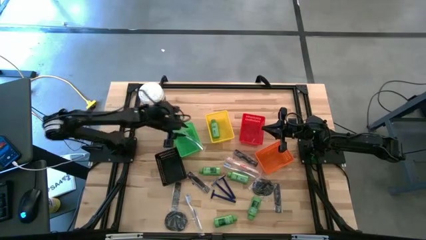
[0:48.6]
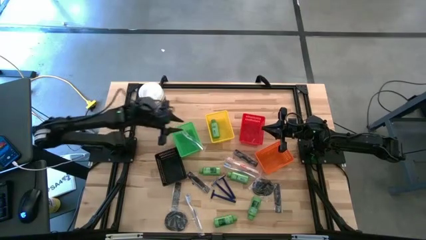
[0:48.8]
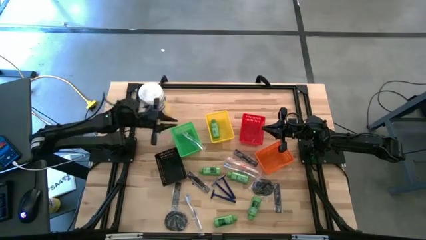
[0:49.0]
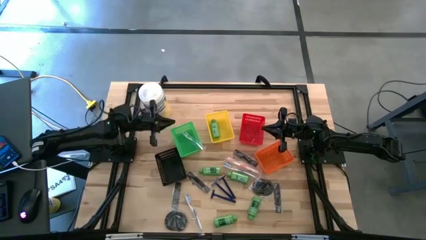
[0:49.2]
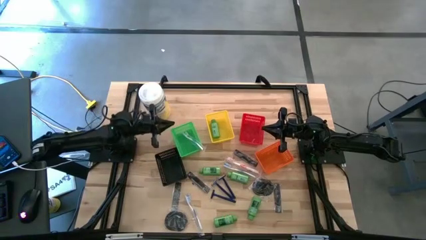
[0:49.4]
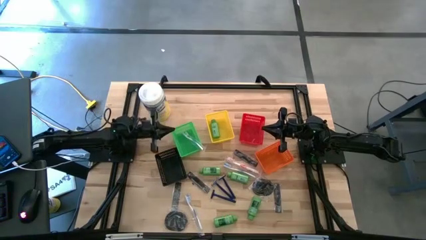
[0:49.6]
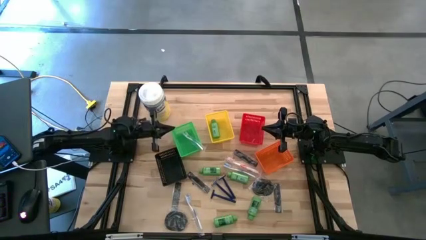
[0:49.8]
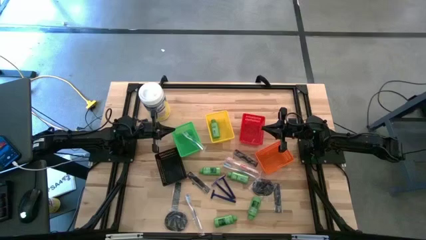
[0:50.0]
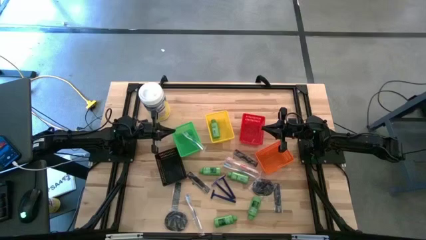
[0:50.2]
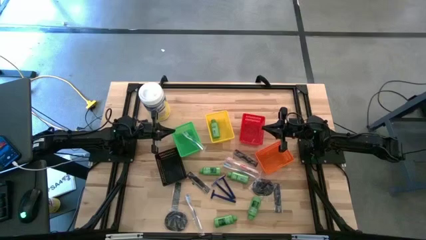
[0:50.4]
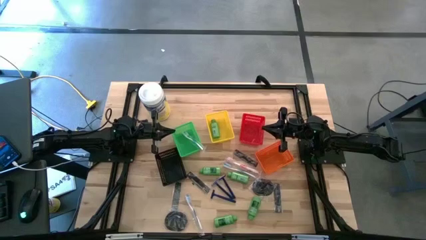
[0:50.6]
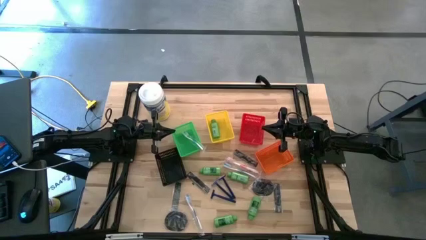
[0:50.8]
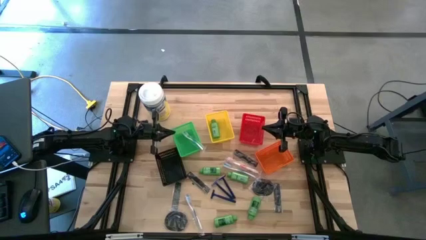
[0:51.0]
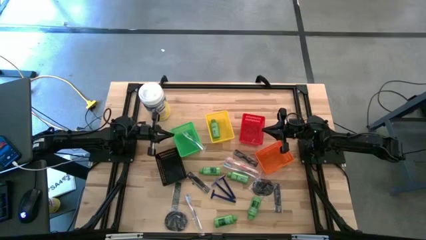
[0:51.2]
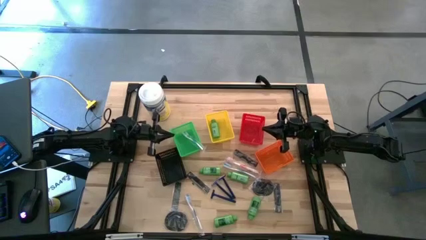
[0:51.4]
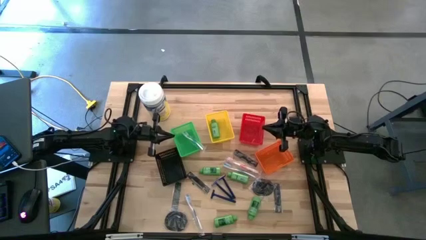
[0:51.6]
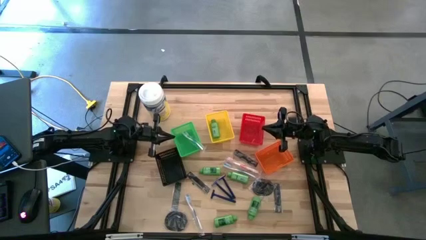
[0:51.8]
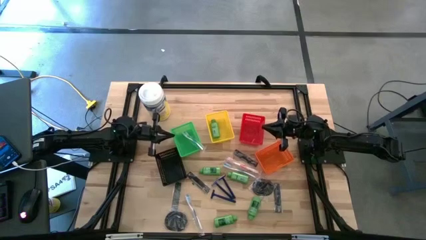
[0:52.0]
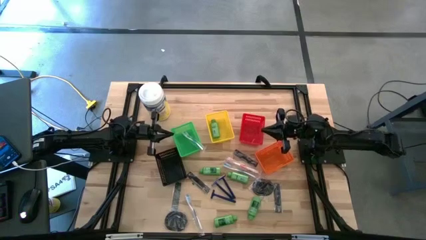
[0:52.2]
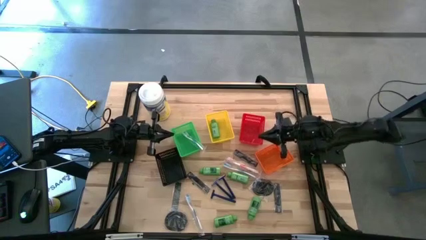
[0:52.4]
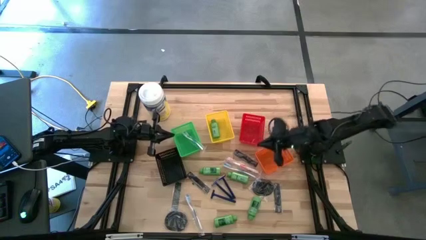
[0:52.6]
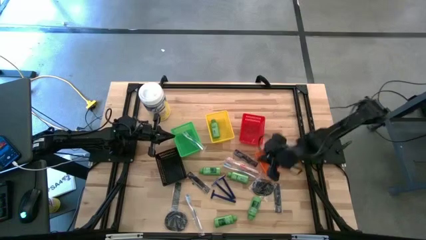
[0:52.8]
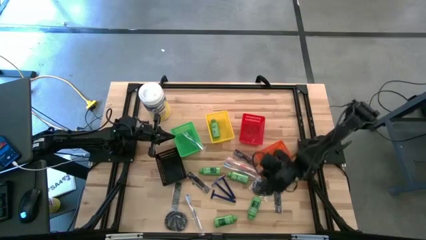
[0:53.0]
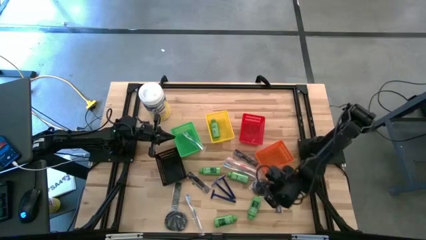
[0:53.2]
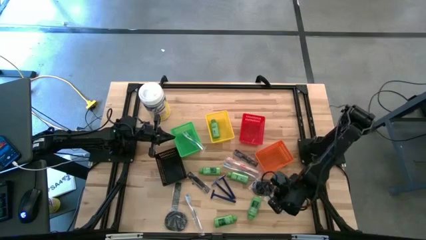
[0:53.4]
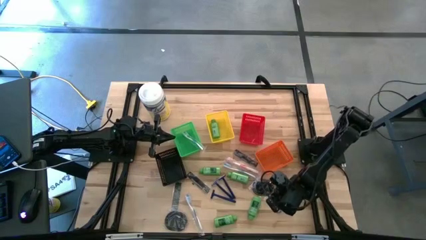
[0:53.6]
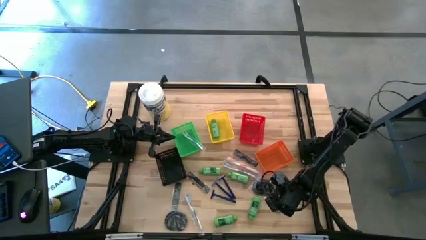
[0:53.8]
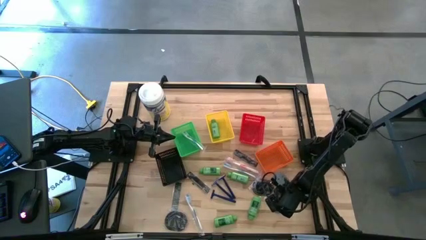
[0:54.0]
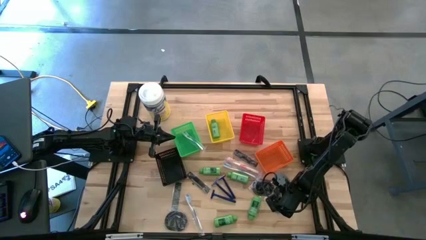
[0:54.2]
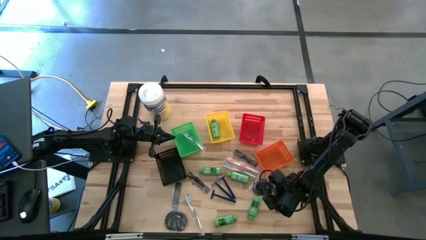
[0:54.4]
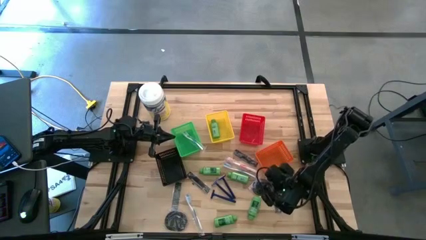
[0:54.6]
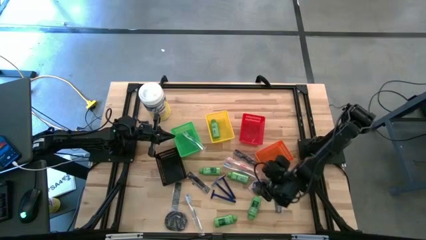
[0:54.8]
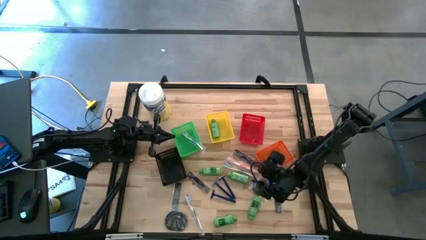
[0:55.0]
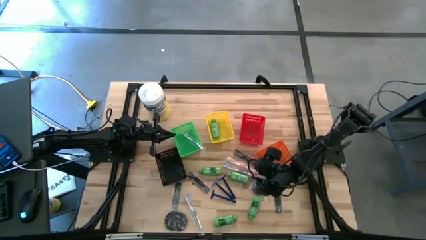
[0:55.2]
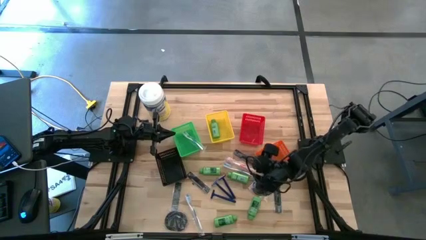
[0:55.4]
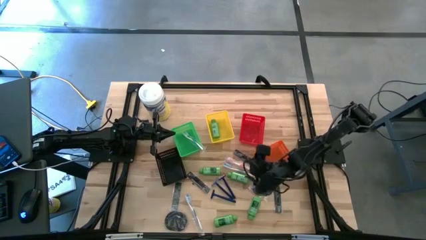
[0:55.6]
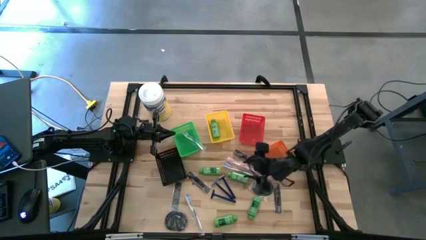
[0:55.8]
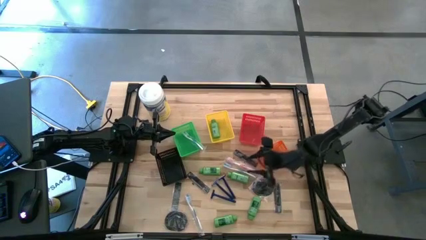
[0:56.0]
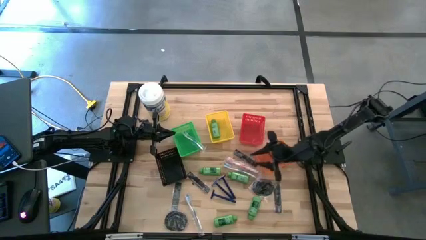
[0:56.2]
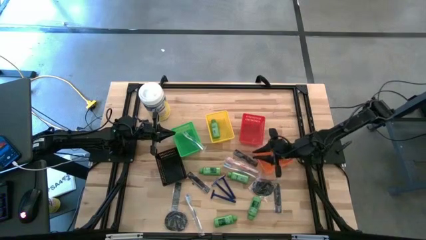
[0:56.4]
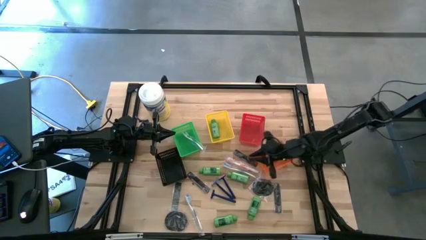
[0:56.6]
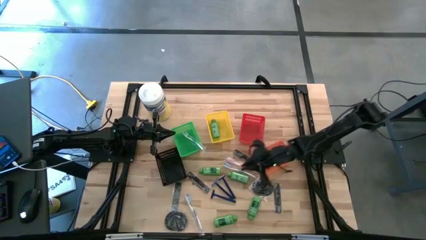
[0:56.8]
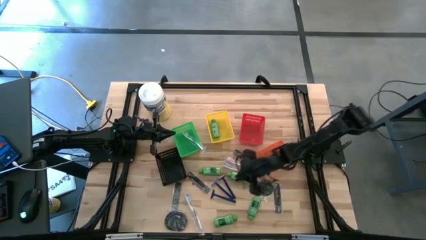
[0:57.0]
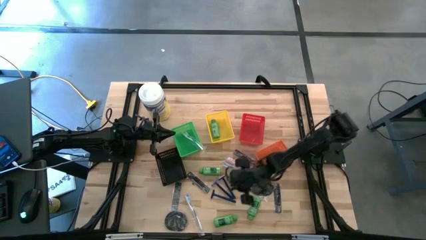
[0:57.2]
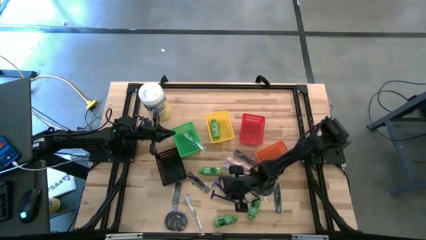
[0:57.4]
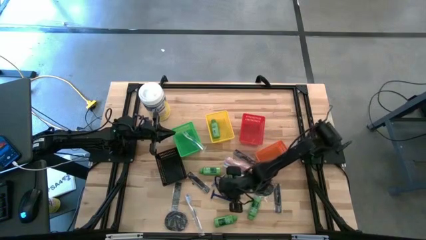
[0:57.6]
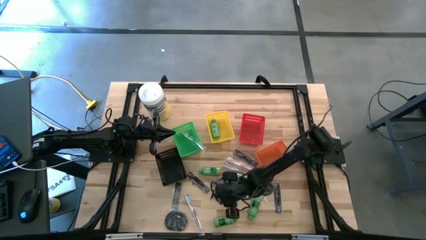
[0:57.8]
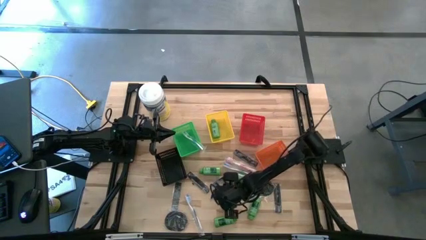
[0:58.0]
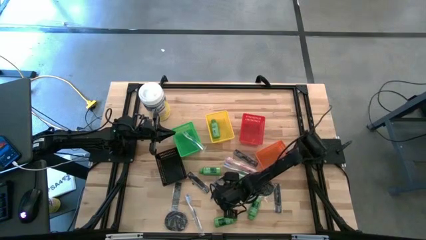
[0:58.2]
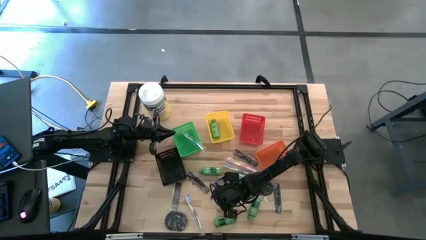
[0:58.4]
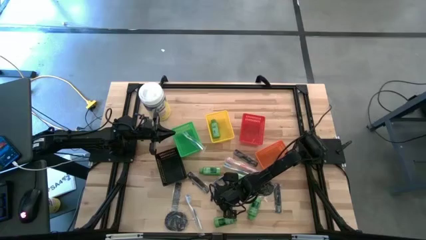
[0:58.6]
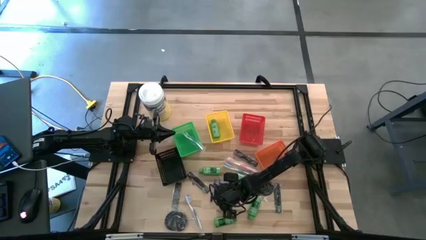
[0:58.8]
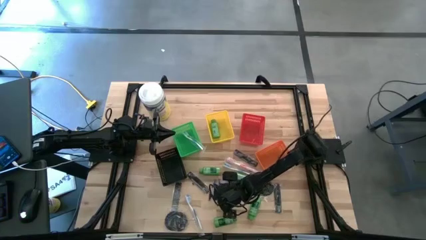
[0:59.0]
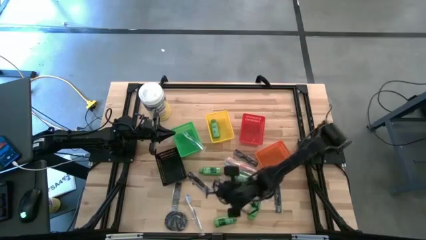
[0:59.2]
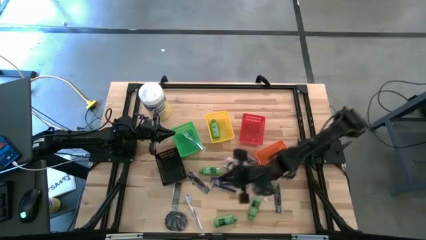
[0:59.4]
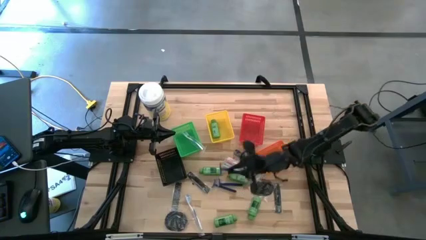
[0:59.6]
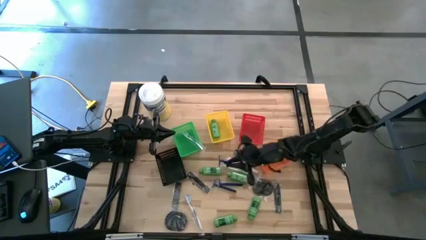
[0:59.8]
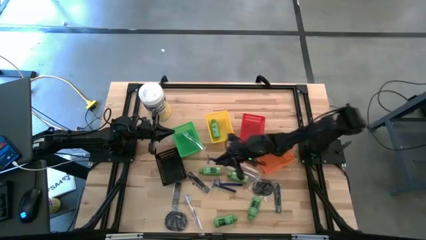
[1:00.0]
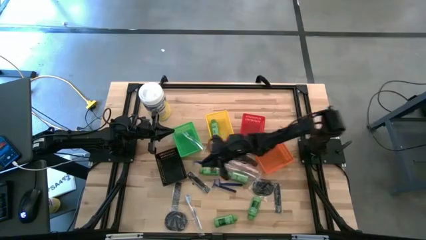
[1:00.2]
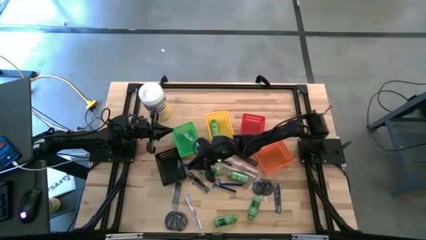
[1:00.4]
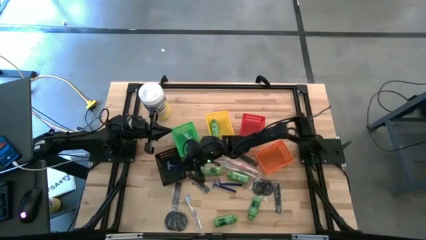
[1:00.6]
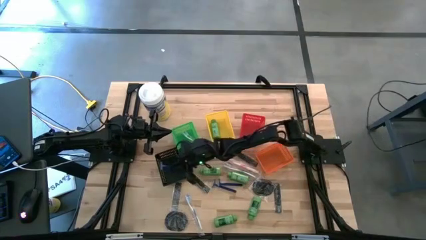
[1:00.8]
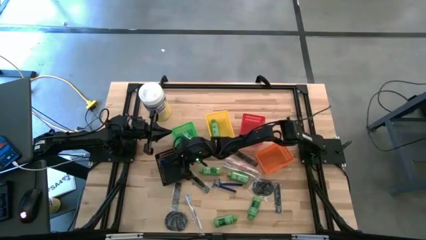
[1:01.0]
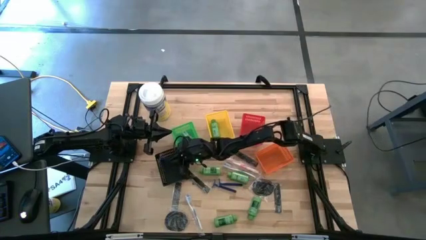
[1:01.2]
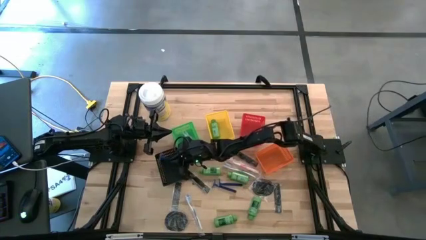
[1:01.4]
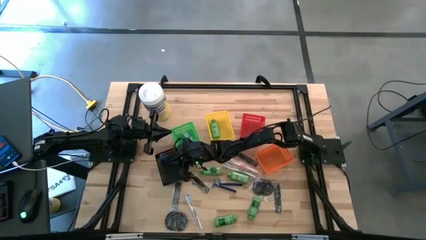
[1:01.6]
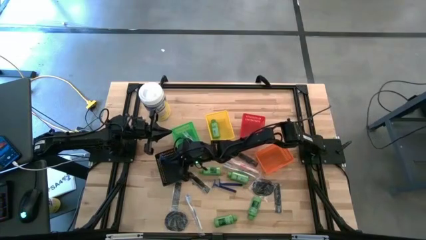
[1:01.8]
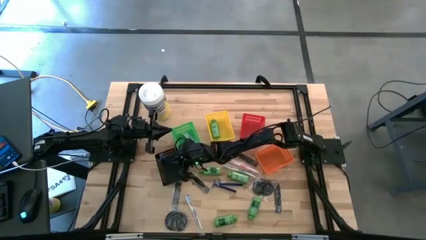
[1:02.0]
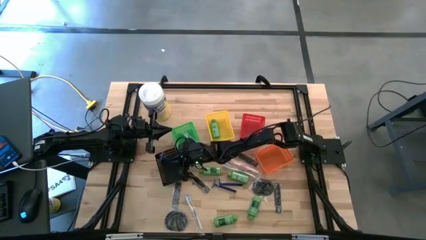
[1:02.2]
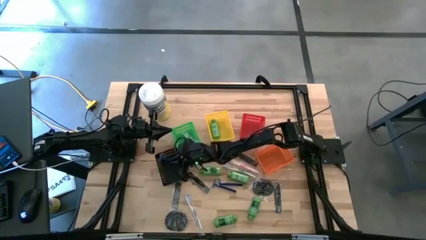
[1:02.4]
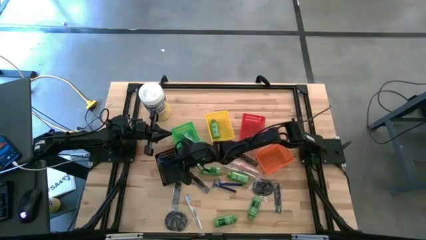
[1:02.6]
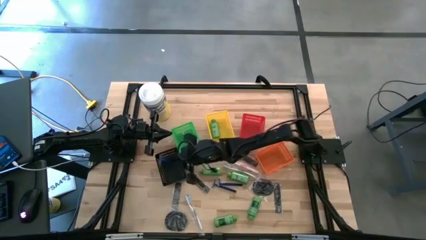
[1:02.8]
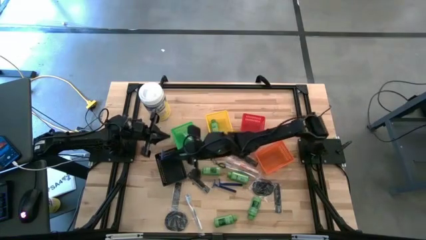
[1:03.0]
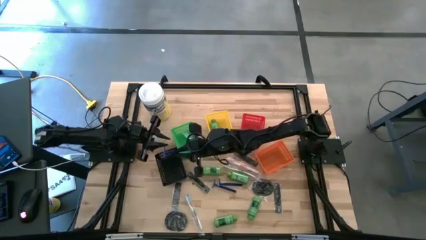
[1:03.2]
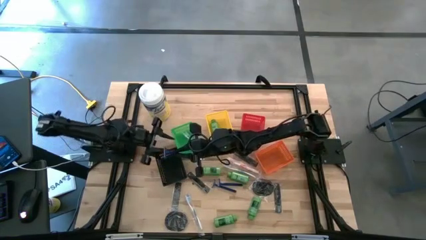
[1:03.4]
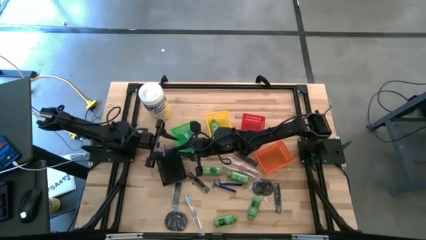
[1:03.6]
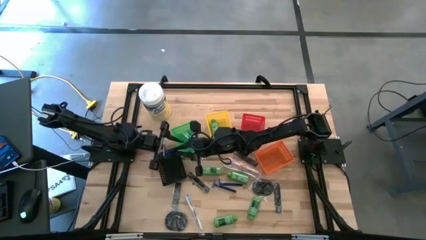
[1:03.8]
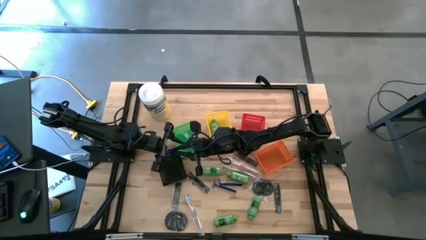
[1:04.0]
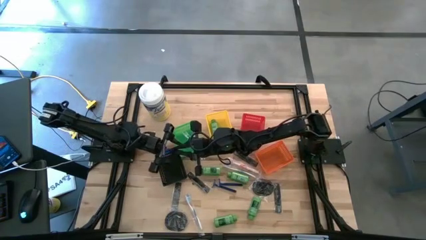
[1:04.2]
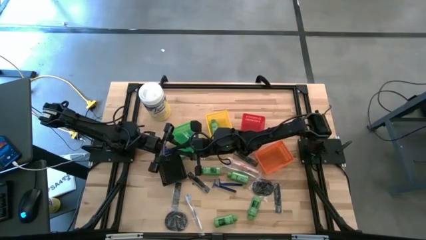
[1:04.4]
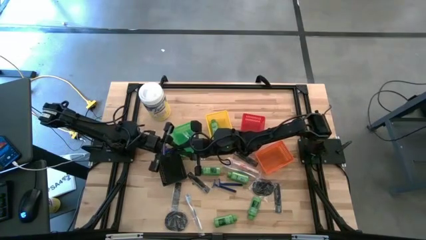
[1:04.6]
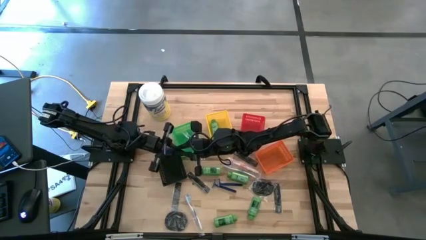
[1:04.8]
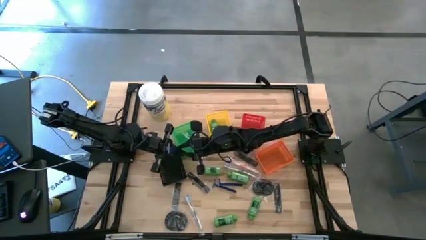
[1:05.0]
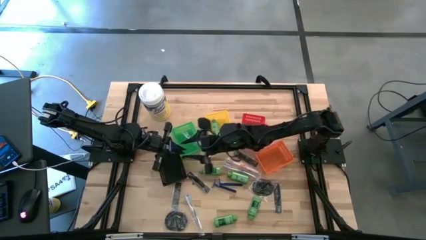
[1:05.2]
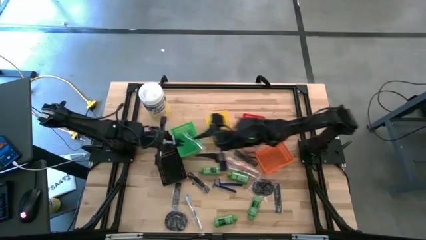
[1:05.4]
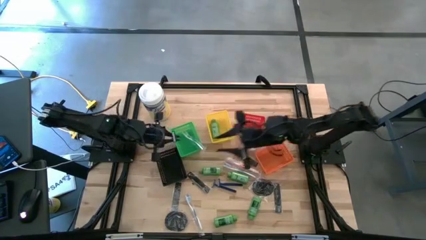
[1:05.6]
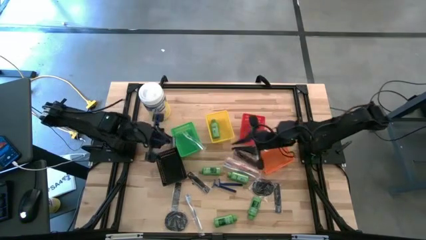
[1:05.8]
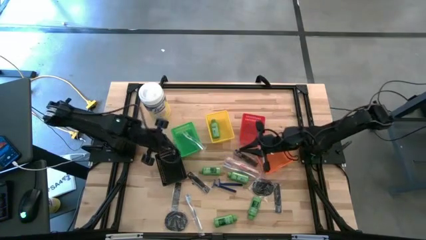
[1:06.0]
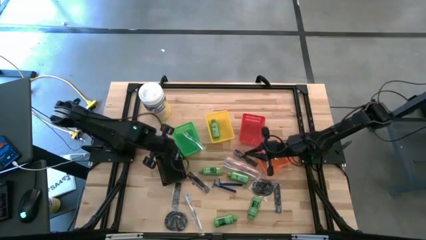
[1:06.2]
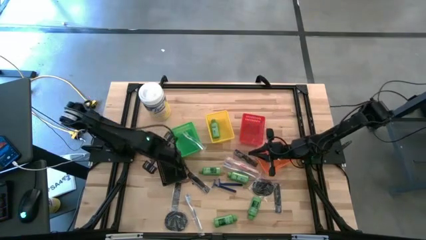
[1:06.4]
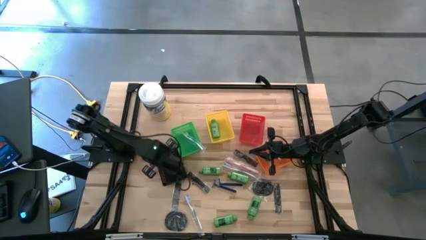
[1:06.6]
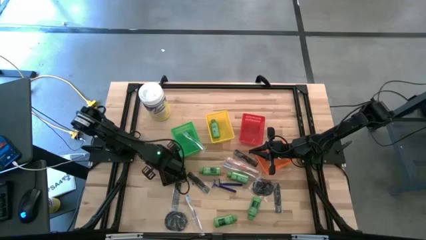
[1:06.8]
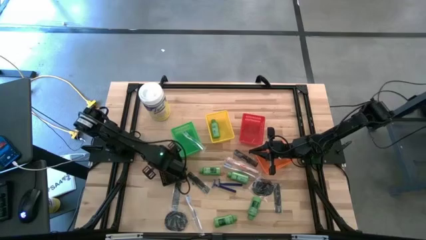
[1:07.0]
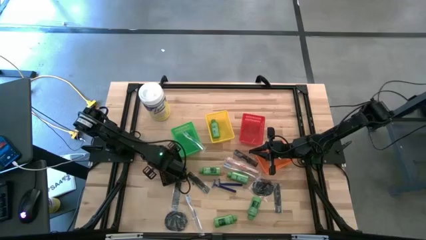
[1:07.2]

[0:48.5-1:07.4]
Task: Pick & Place Travel size toiletries
Put the blue razor into the black bin
